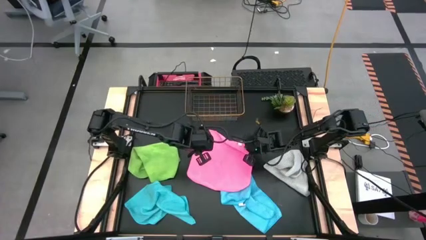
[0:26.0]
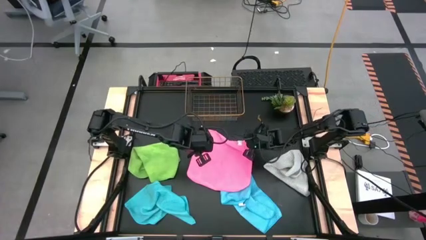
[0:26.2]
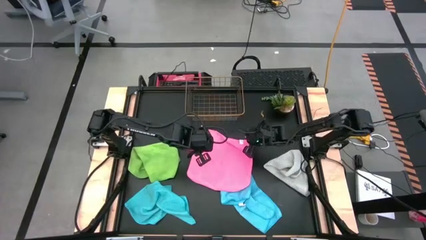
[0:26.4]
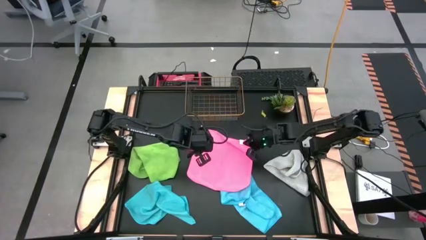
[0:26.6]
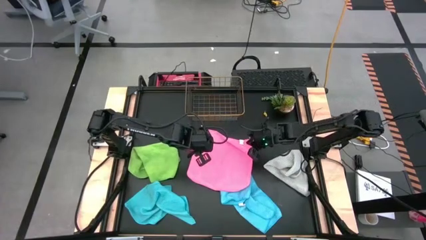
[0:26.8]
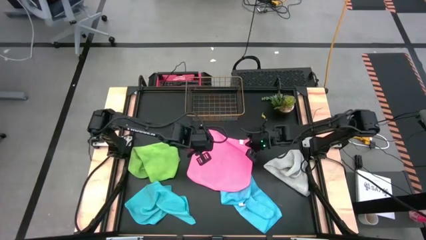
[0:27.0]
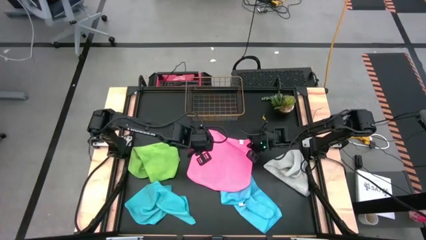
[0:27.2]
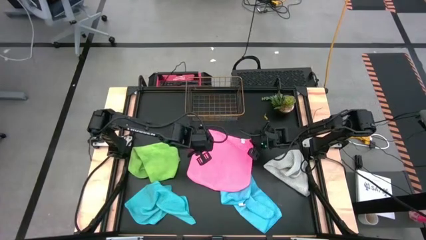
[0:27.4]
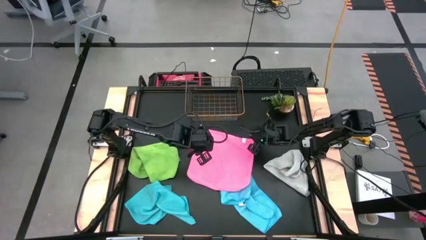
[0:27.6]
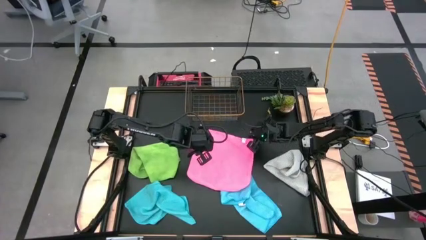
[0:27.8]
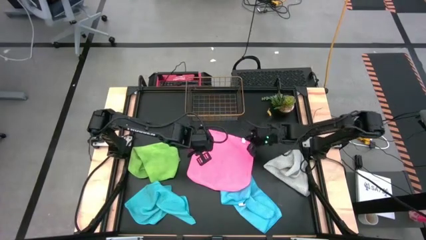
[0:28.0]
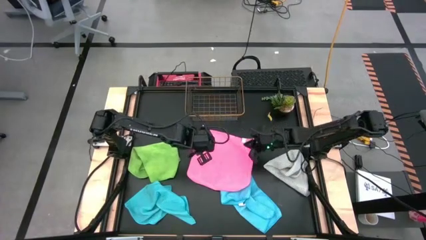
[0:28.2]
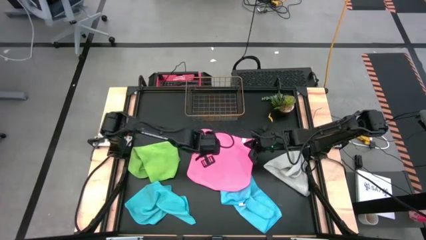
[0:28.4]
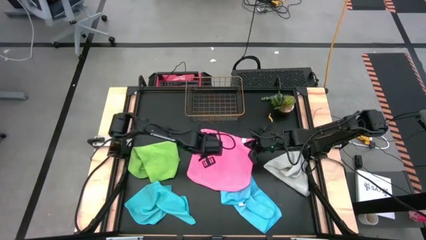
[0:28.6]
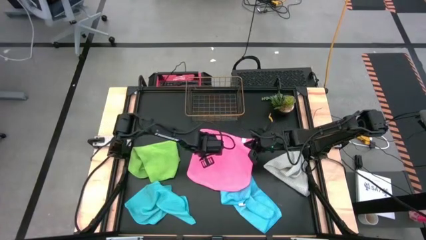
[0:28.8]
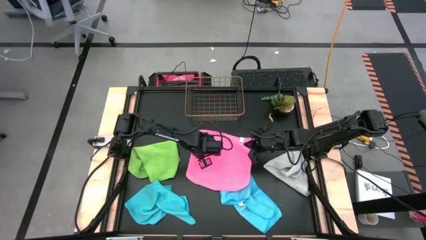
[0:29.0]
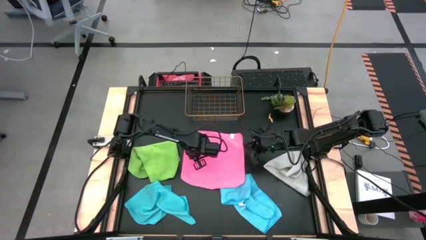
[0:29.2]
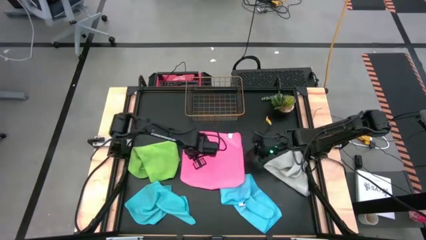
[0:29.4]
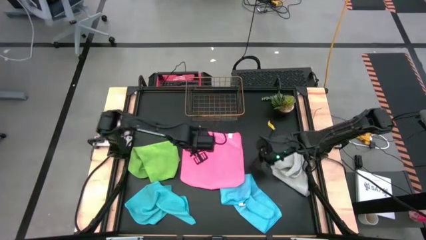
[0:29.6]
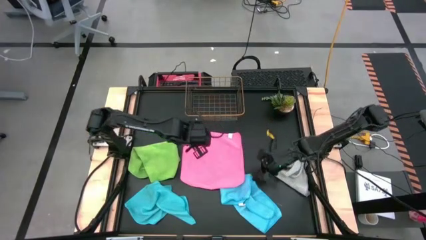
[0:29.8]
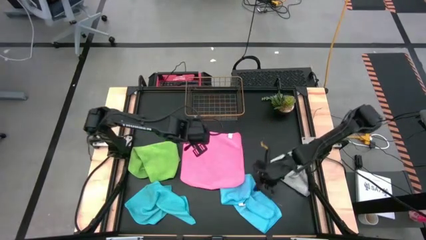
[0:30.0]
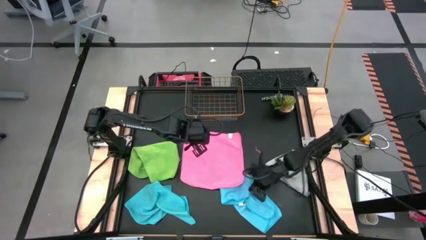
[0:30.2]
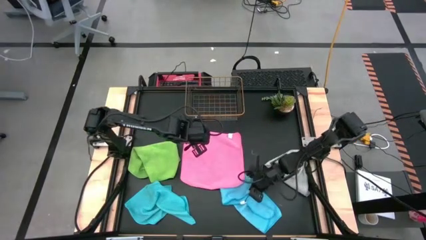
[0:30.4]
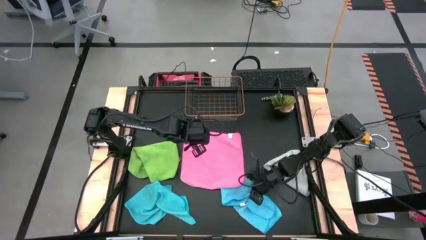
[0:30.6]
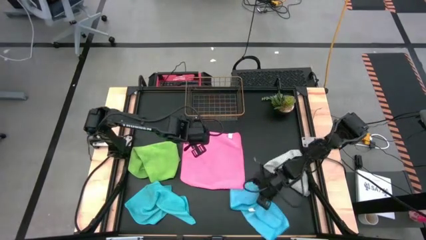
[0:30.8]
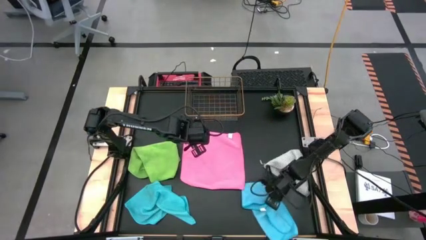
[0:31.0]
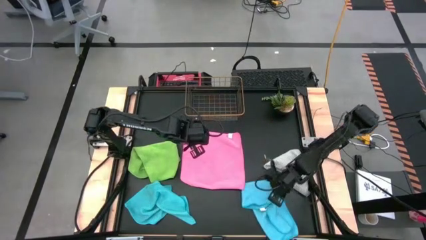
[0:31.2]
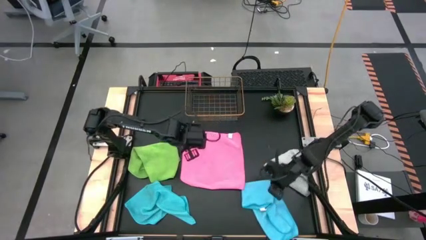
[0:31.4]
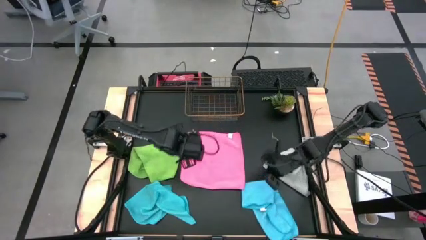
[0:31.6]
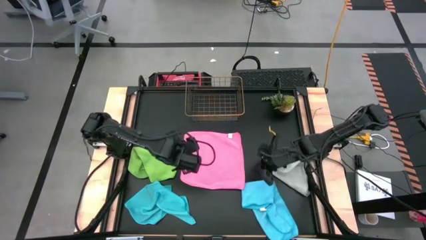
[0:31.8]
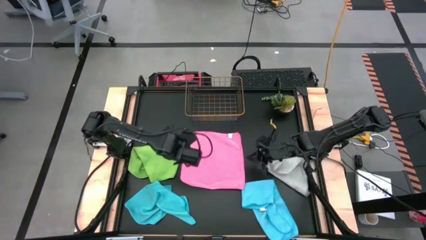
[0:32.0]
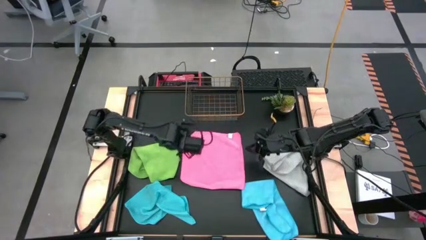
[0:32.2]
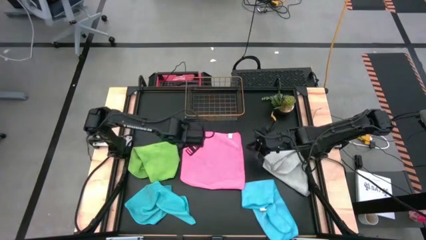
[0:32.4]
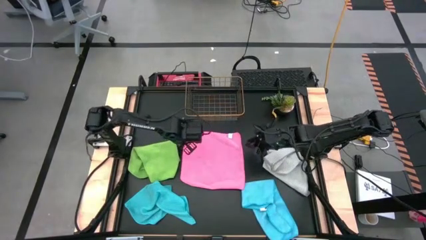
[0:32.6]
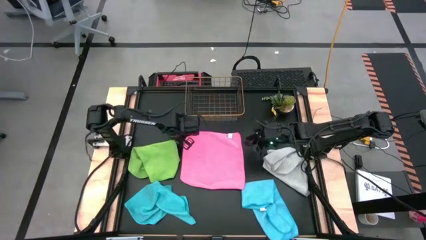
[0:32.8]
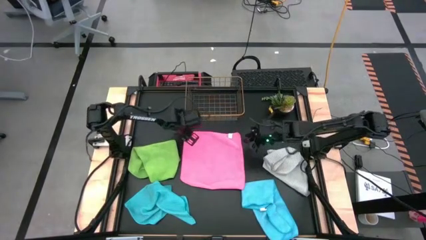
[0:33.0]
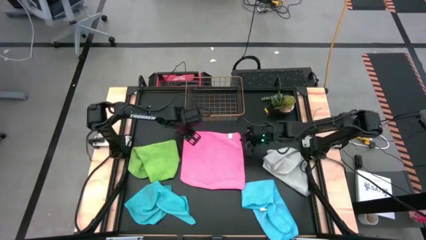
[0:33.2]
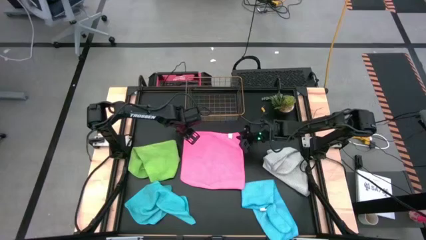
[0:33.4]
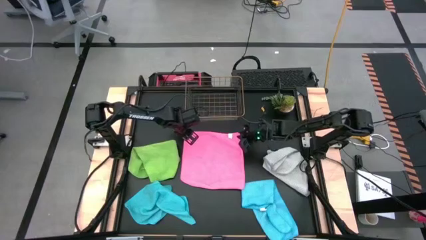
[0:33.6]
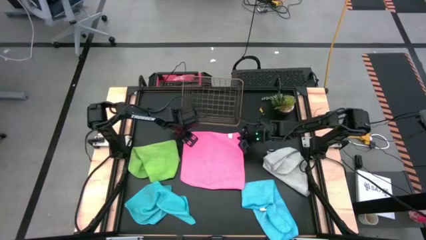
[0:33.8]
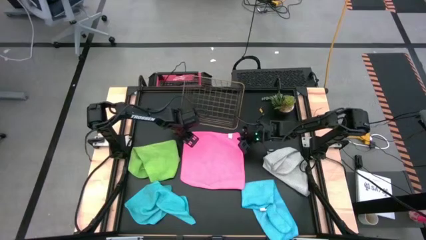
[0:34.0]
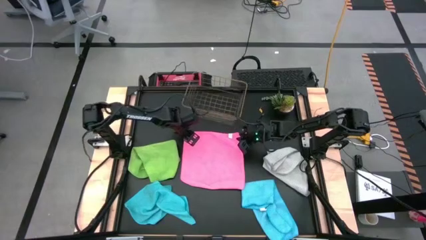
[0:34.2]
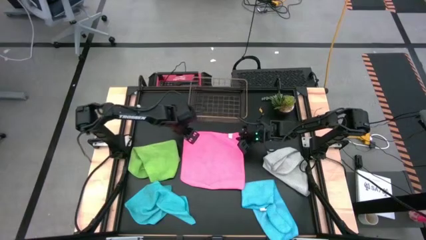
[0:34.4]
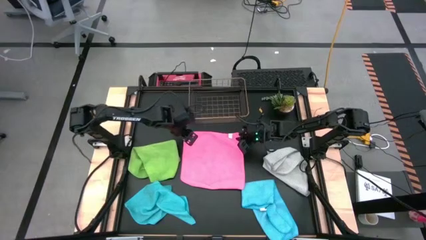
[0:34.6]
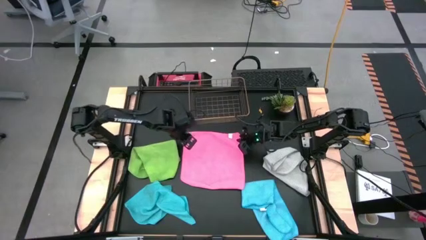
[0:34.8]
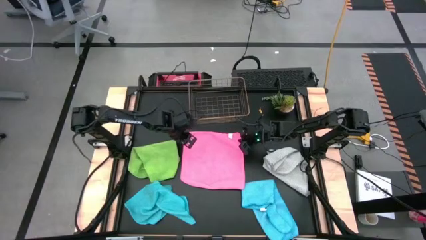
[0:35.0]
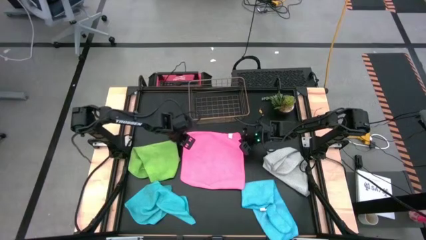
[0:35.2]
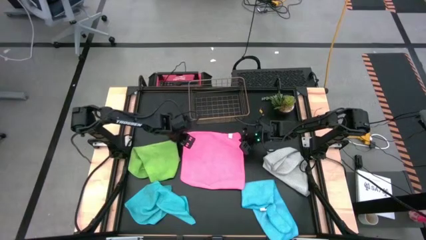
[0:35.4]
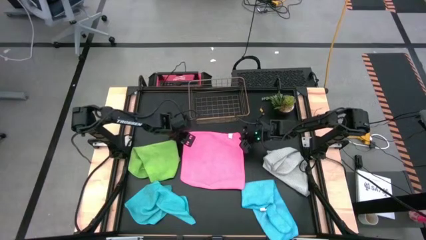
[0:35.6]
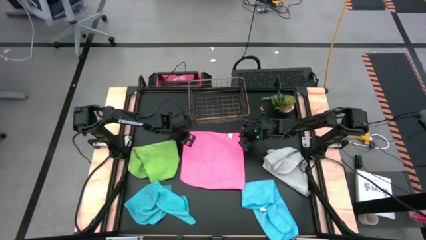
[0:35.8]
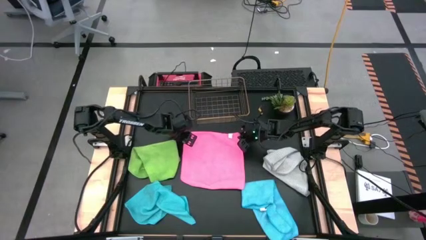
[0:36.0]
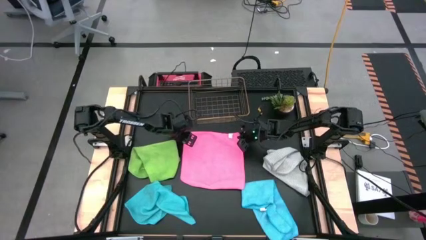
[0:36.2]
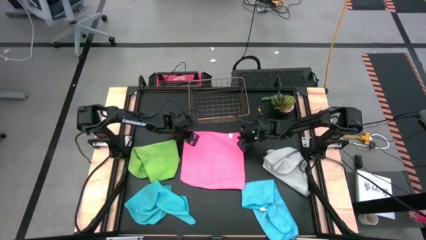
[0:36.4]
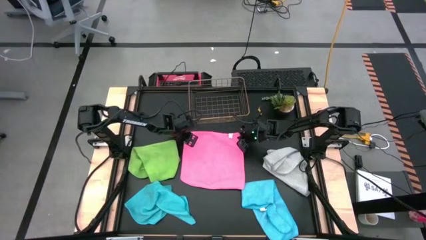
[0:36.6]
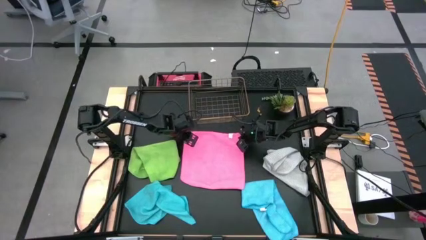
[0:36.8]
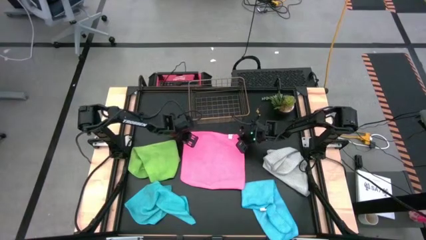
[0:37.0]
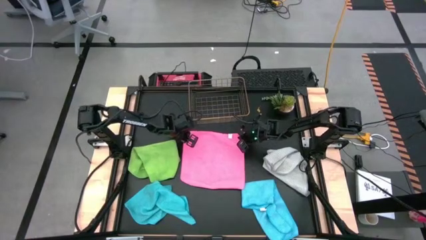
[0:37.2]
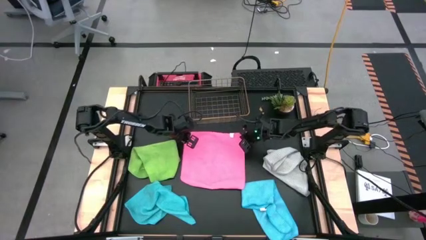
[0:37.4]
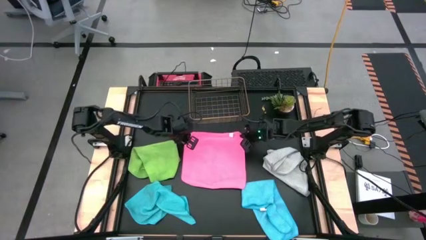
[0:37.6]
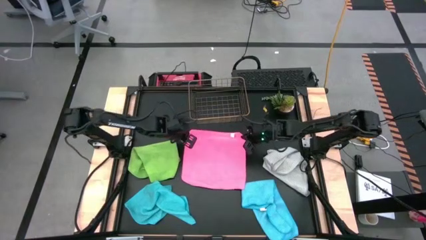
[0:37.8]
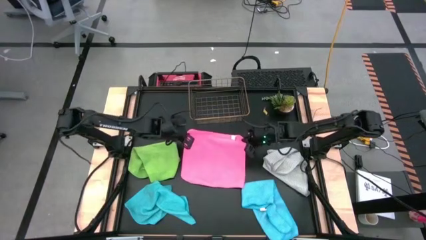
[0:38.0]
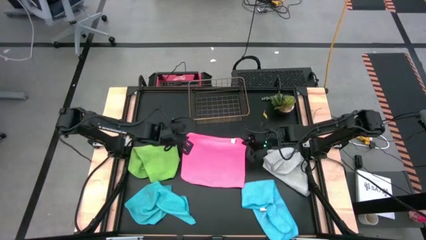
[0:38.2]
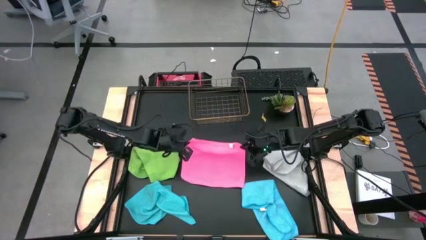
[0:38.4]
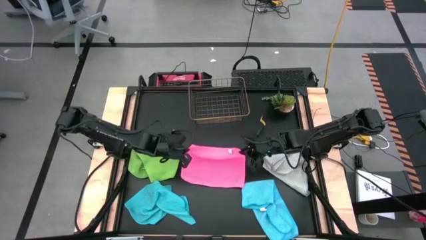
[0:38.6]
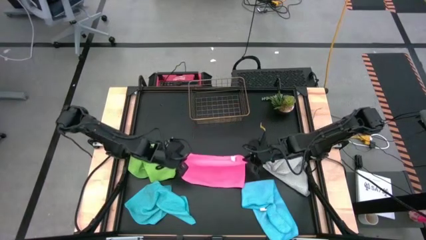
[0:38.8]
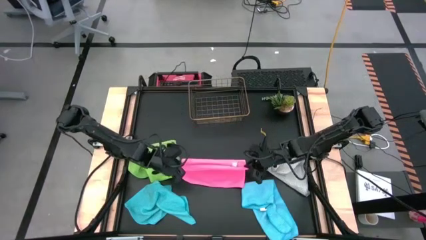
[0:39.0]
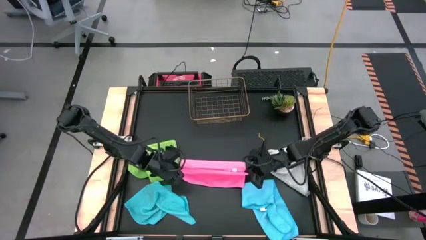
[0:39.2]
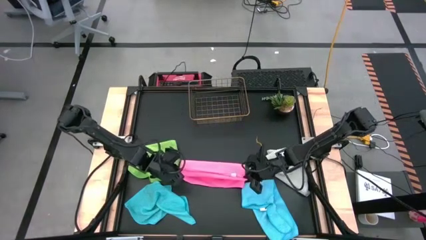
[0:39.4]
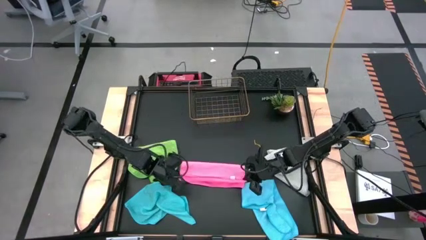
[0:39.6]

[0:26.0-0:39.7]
Task: Fold microfiber towels
Fold the pink microfiber cloth
